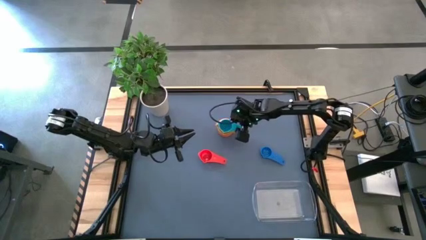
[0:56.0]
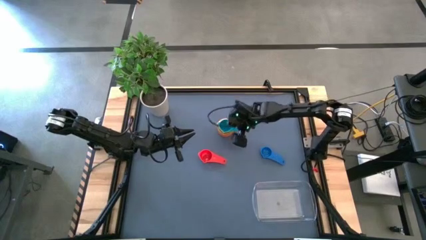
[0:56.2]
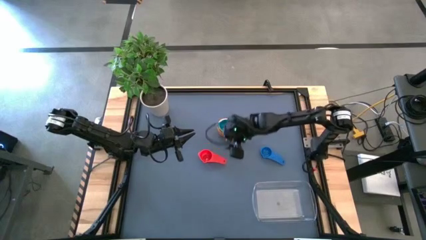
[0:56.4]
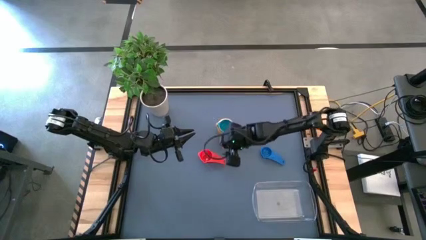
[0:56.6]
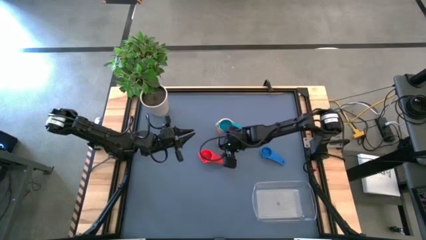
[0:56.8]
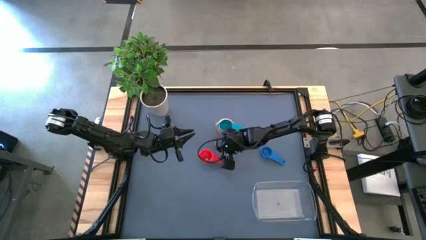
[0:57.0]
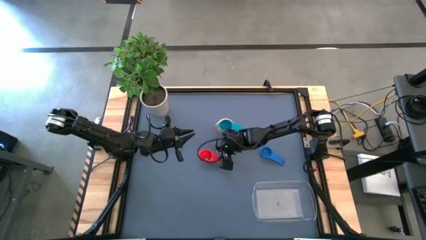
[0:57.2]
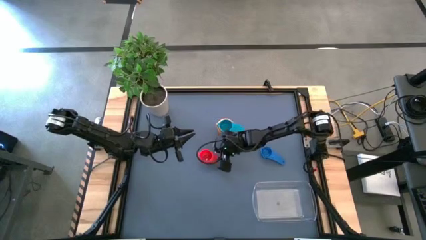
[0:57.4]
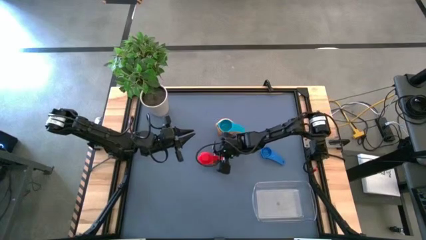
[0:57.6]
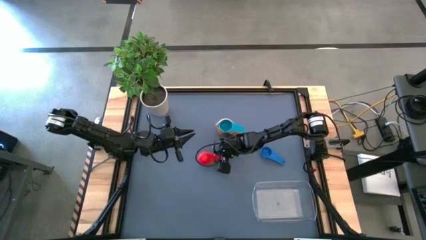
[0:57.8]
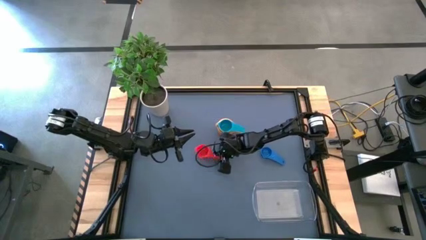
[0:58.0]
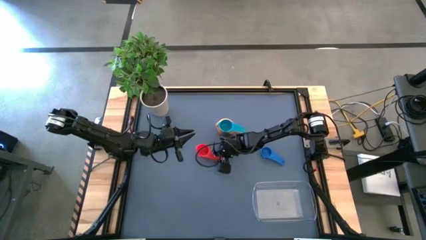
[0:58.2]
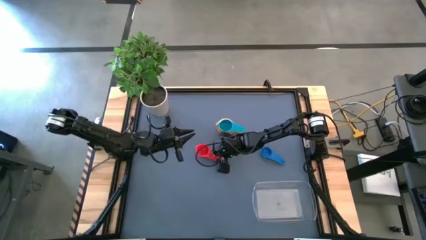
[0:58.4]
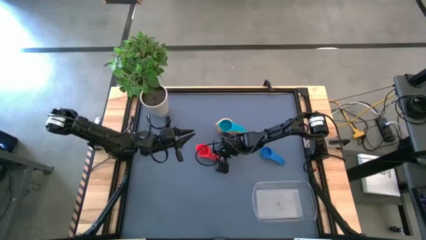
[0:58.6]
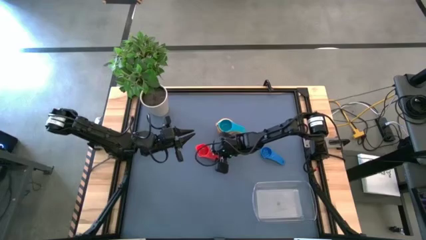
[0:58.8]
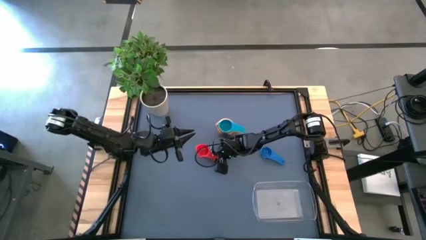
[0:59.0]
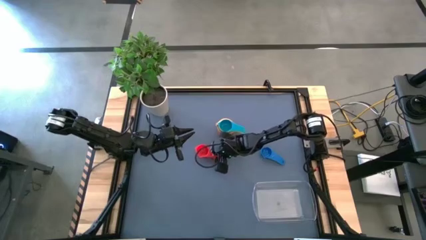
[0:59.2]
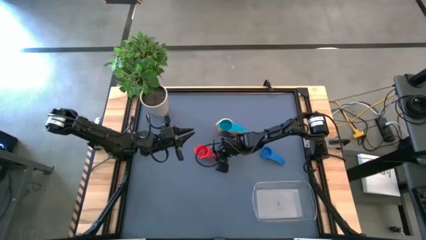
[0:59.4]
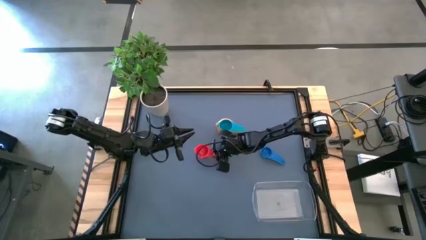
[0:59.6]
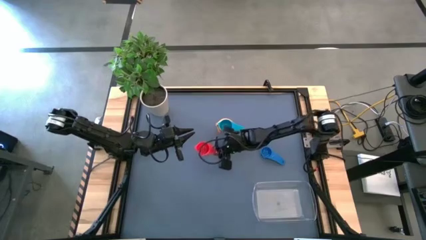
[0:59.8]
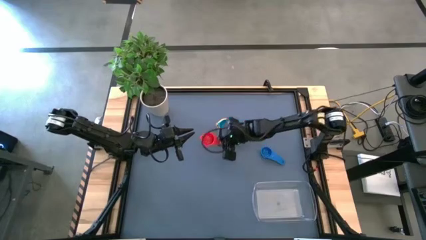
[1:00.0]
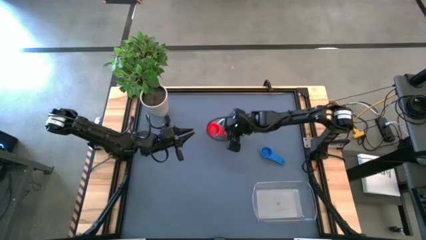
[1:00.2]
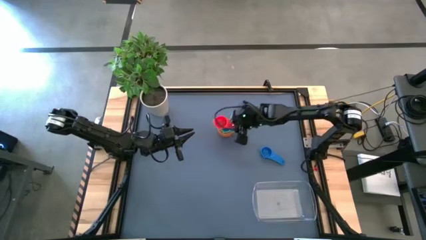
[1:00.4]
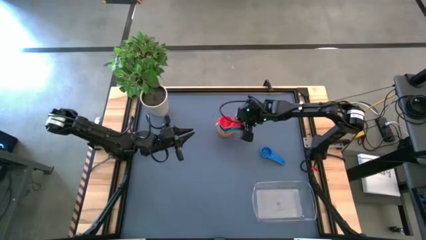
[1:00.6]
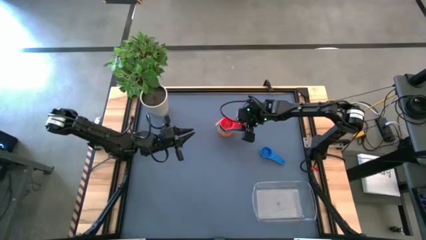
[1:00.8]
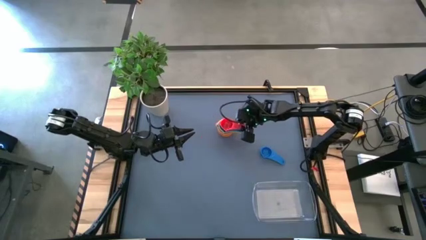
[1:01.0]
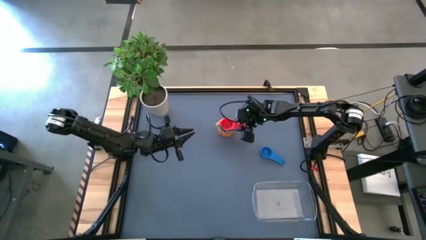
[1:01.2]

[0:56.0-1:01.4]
Task: Nest measuring cups in basket
Stack the red nest measuring cup into the light blue nest measuring cup

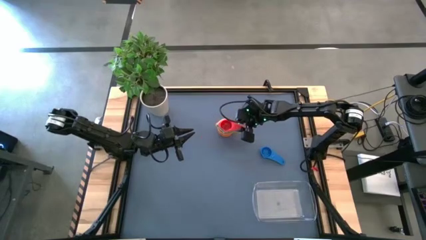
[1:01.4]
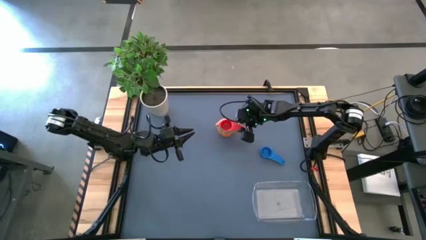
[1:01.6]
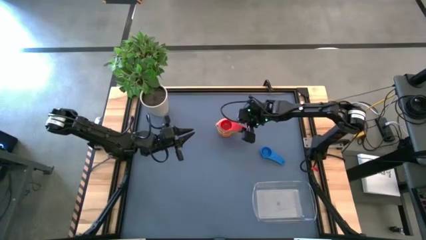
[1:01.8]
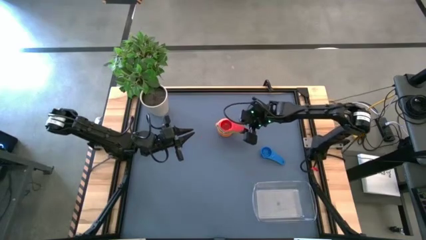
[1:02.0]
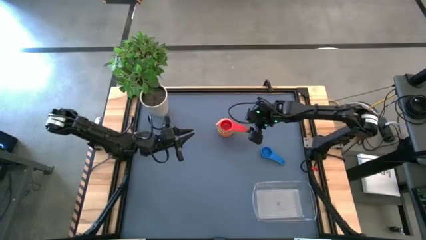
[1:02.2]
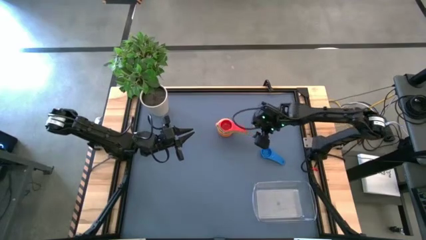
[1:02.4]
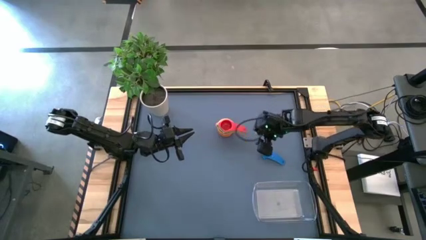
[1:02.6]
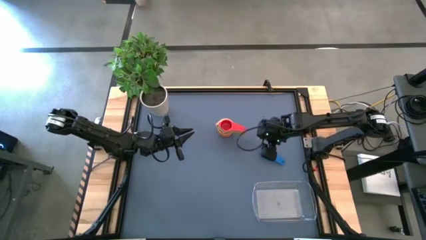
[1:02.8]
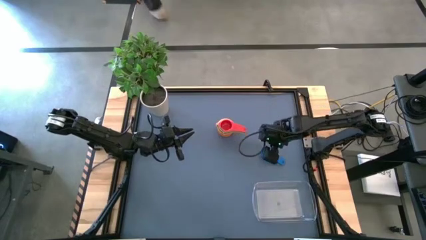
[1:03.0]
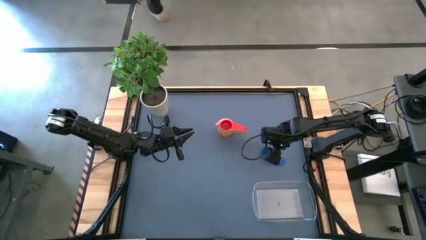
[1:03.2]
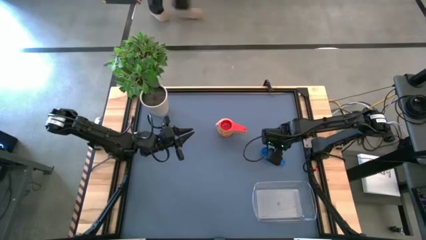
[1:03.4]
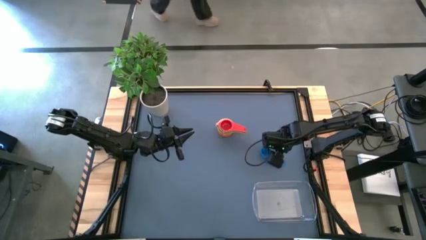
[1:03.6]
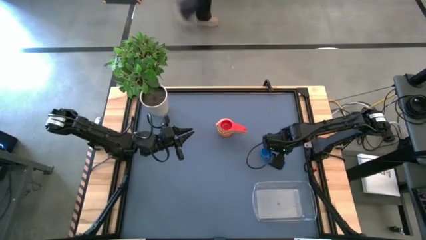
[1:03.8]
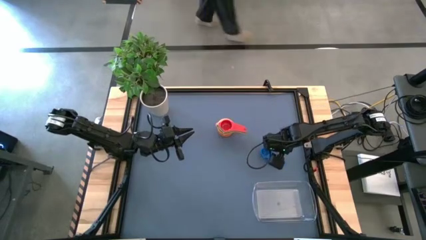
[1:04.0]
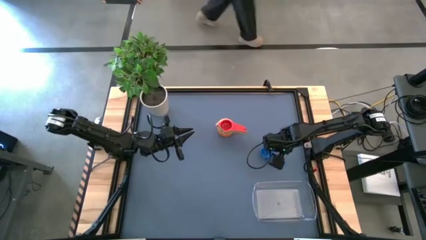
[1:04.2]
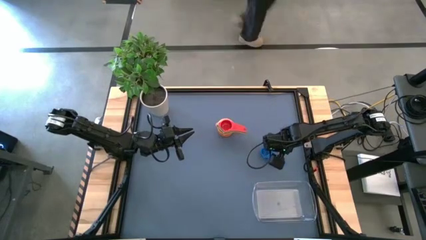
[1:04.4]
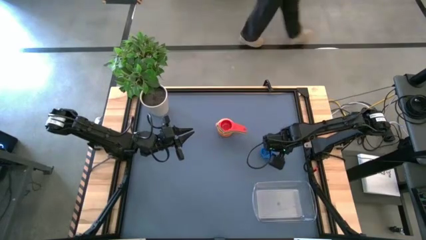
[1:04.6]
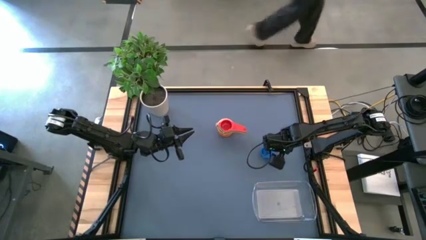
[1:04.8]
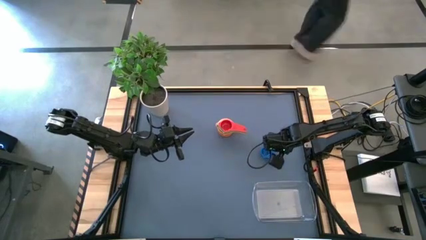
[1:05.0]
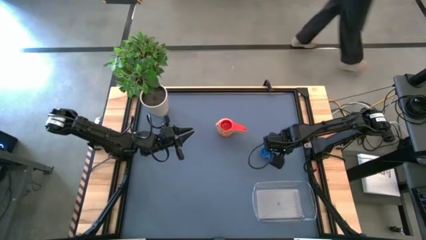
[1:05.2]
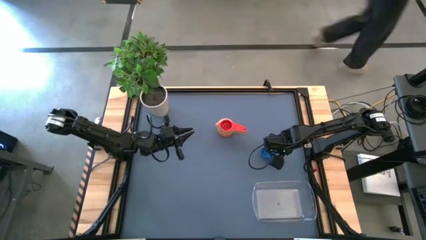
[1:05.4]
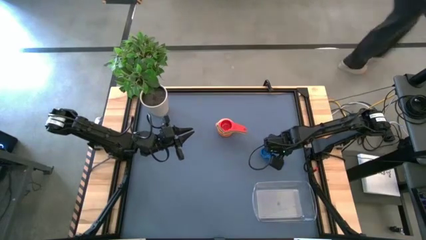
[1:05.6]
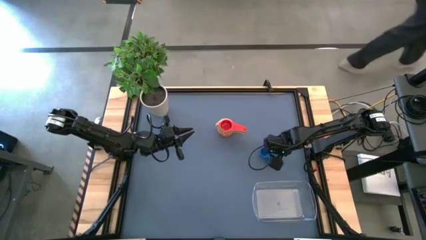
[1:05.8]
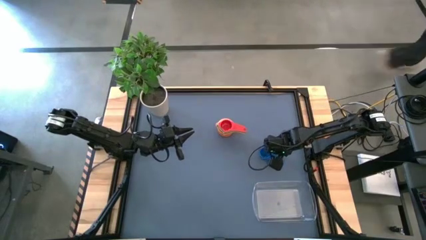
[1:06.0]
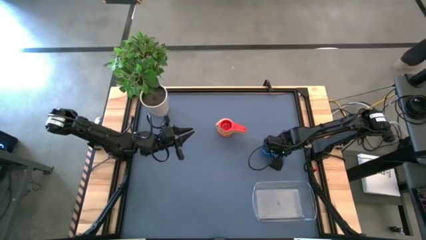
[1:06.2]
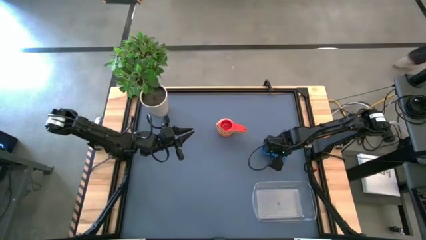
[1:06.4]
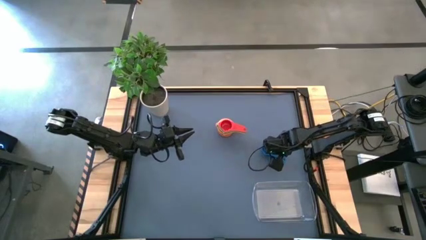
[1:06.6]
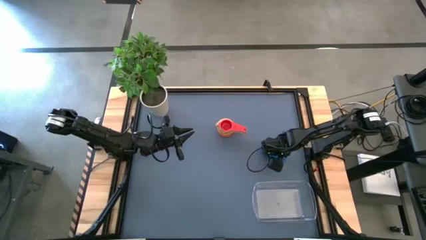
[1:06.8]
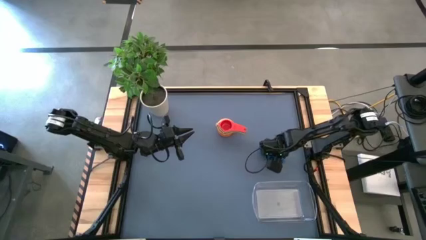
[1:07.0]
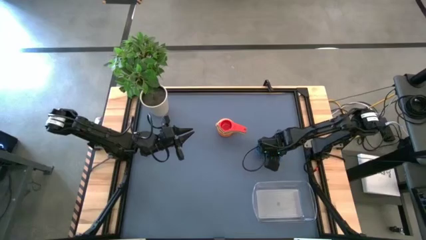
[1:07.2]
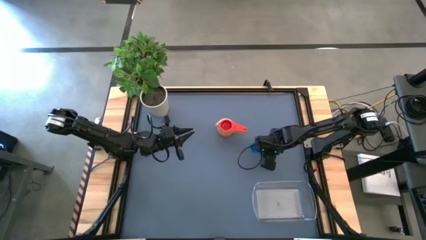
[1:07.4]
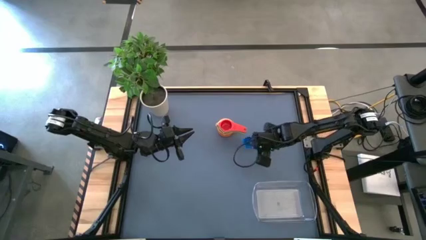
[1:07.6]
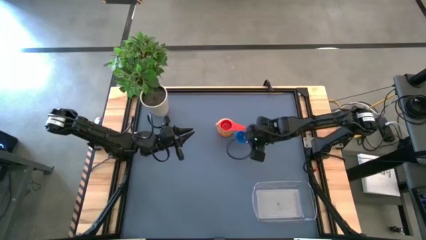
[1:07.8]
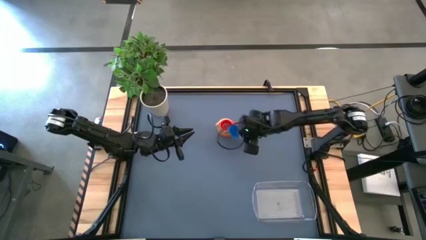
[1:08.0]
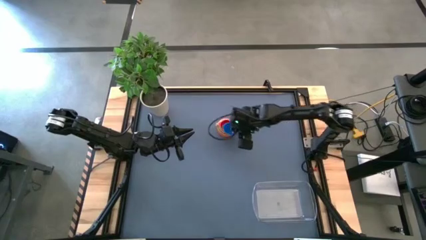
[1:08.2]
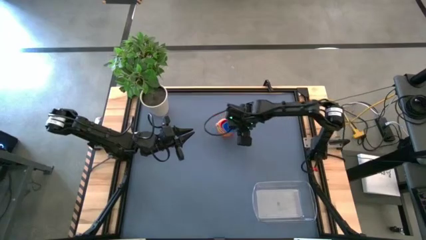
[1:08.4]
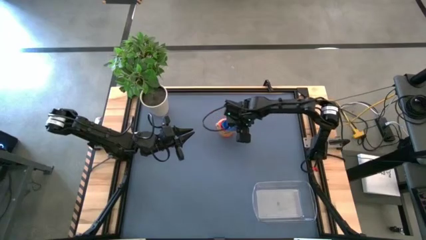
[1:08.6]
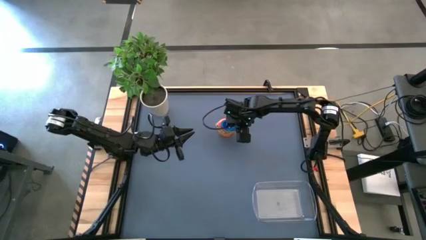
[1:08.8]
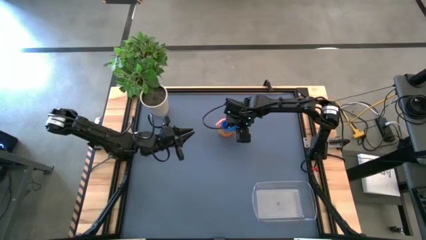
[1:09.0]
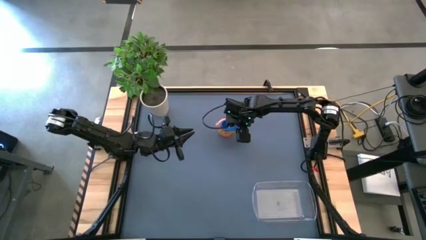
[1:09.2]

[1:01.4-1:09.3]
Stack the blue nest measuring cup into the red nest measuring cup

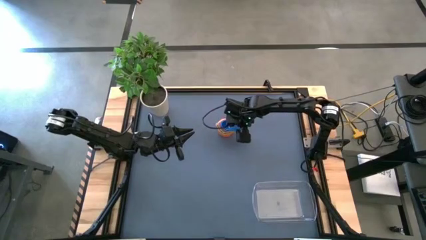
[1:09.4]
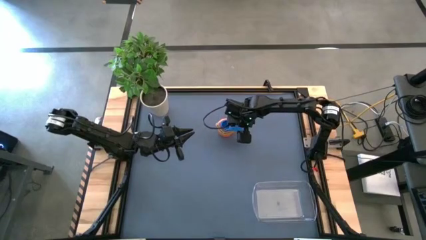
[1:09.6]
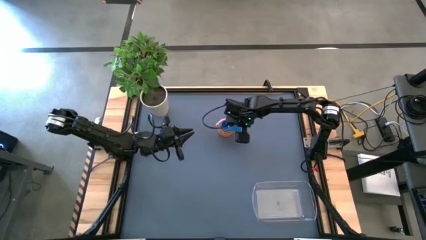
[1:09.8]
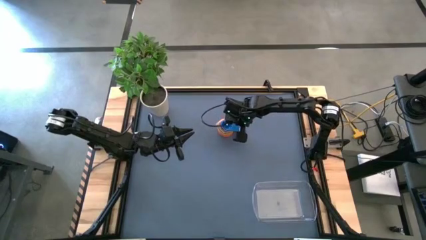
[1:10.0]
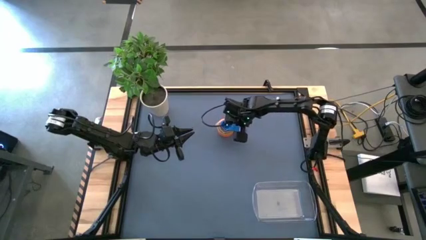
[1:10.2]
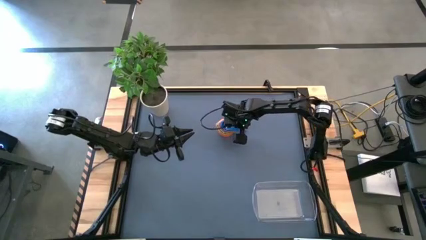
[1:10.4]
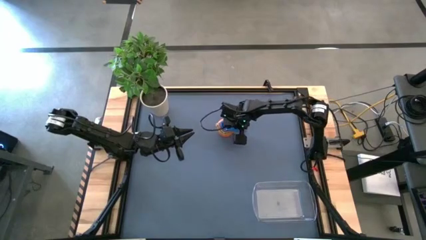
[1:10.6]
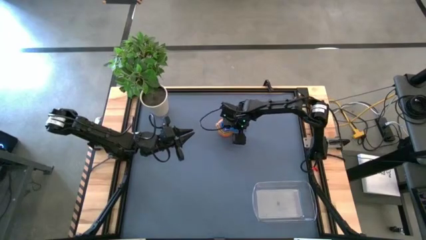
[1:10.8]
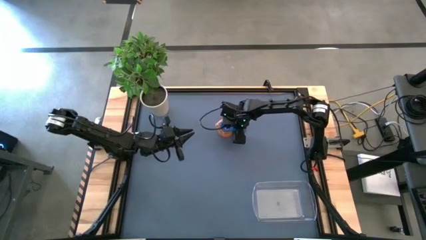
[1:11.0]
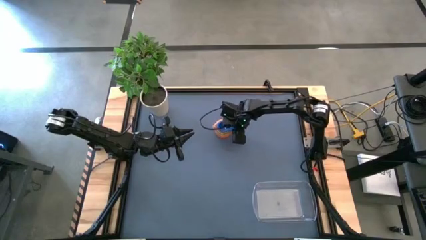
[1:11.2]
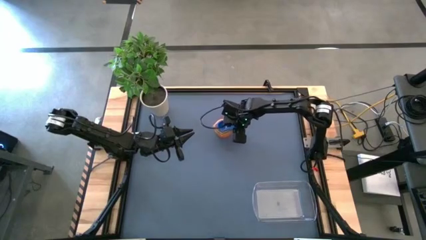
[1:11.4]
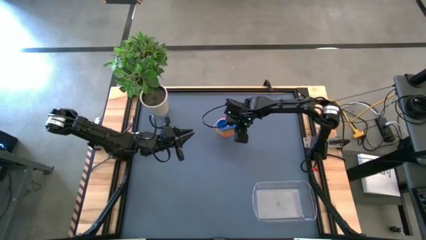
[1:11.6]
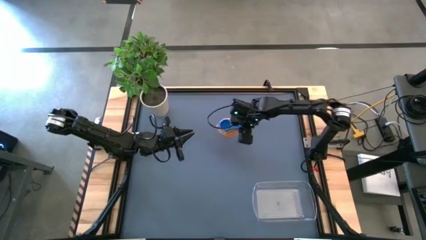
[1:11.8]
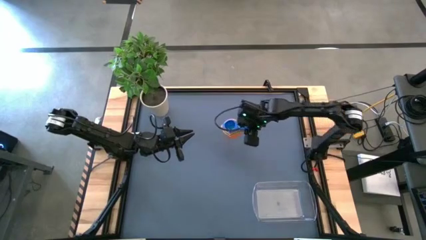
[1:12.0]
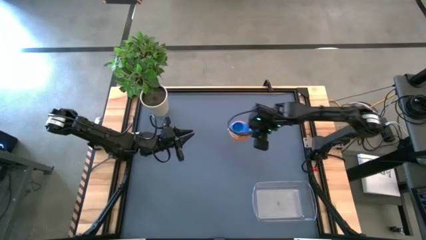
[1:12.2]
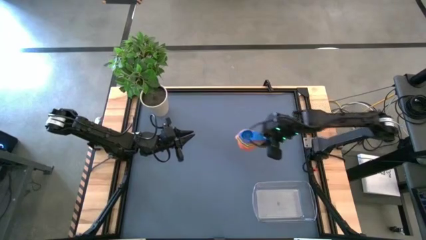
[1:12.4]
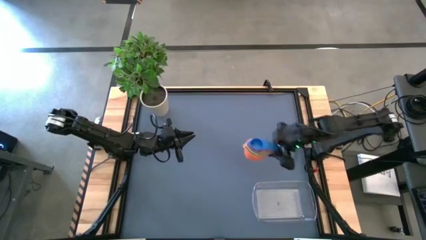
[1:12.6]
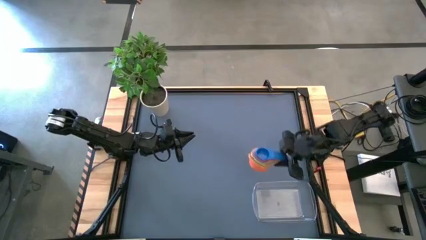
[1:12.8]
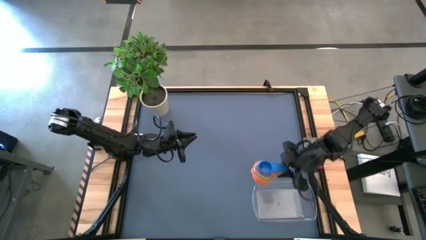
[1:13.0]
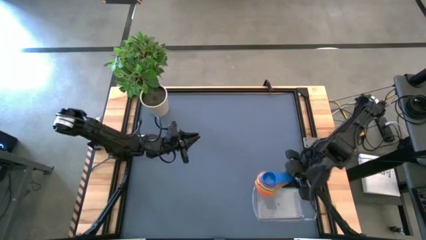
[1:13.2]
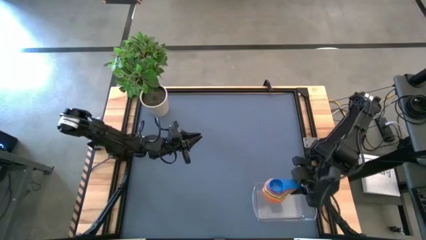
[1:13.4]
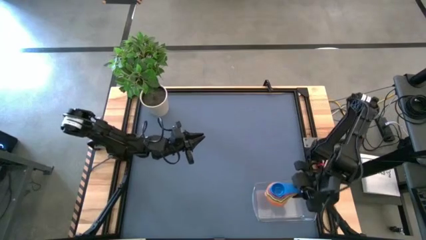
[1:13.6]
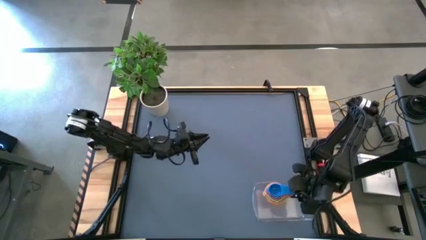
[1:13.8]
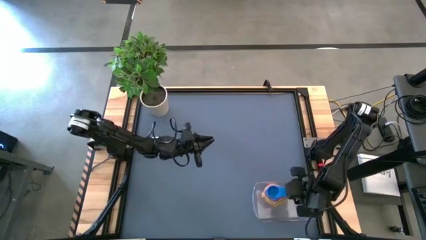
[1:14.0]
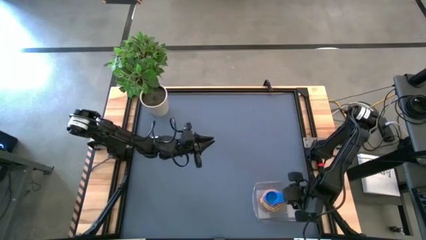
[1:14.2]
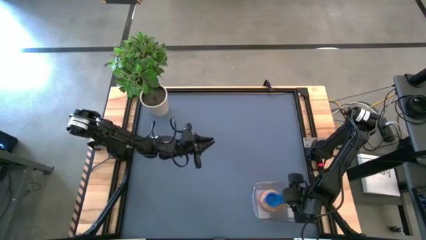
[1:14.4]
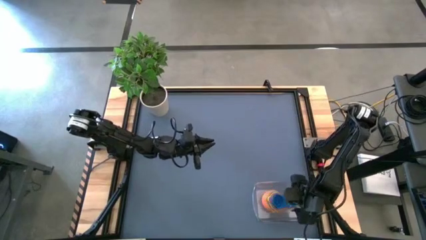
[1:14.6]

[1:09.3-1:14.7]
Put the stacked nesting measuring cups into the transparent bin
